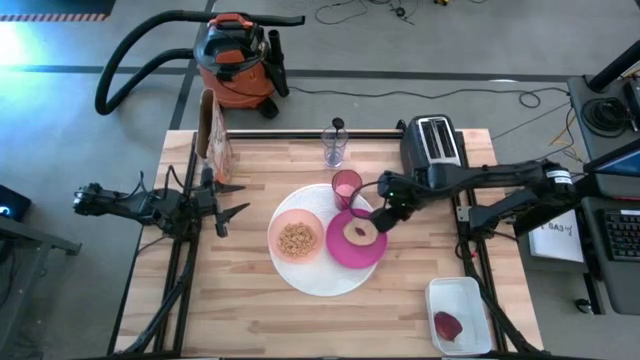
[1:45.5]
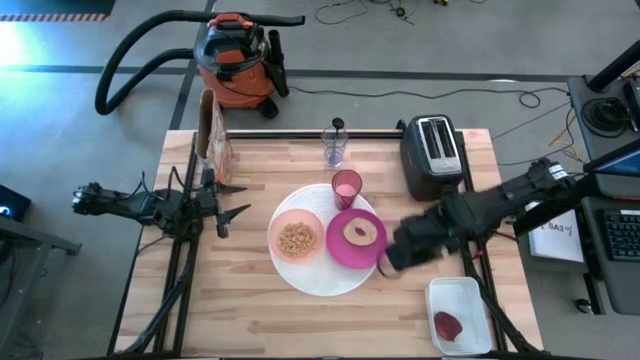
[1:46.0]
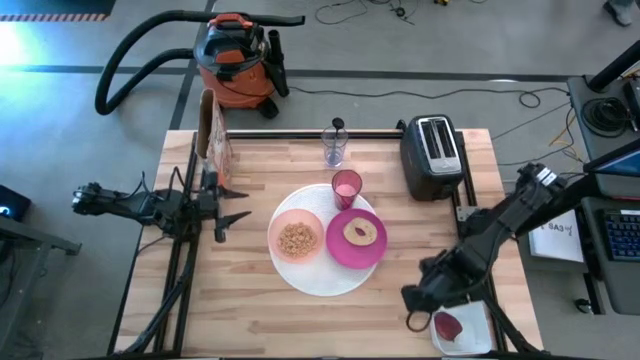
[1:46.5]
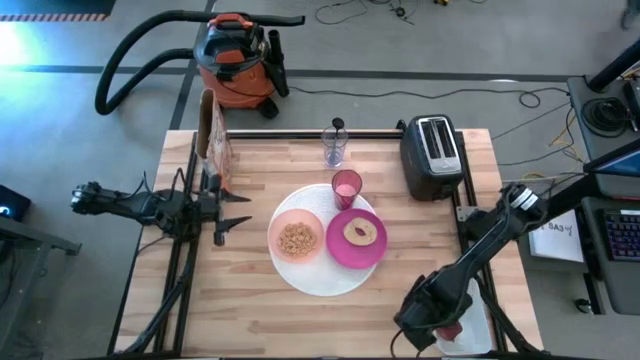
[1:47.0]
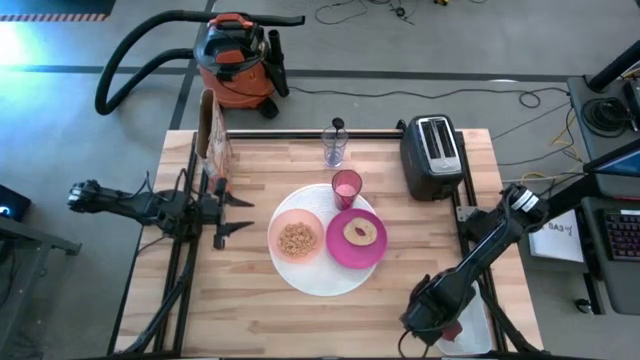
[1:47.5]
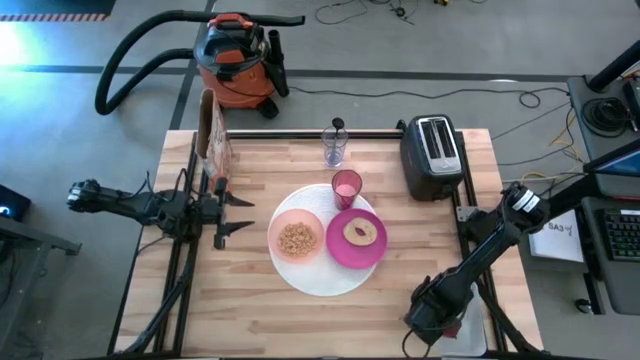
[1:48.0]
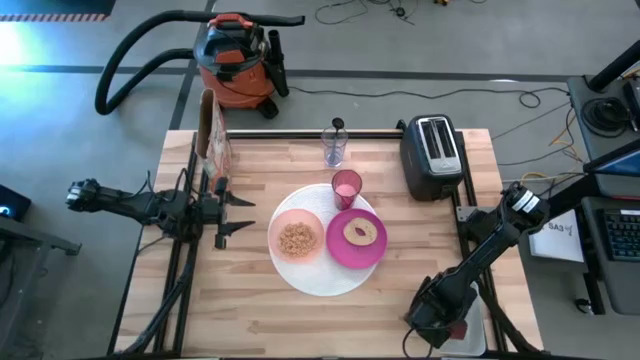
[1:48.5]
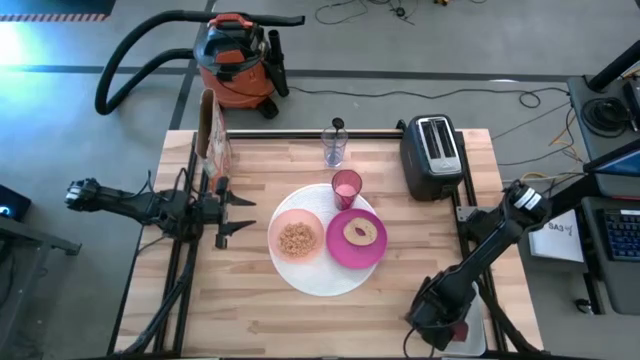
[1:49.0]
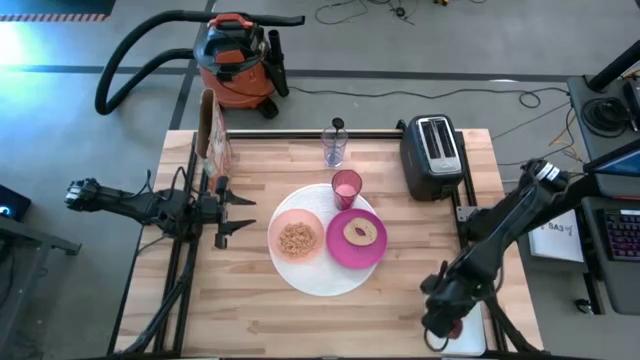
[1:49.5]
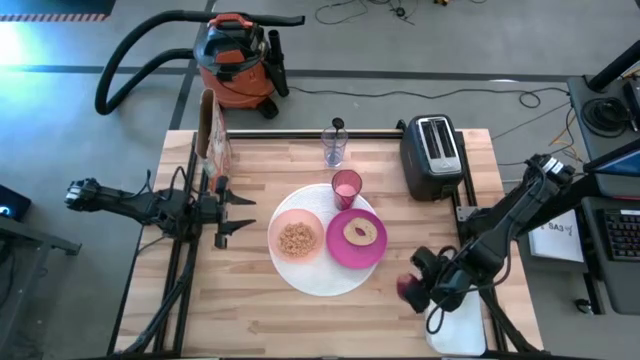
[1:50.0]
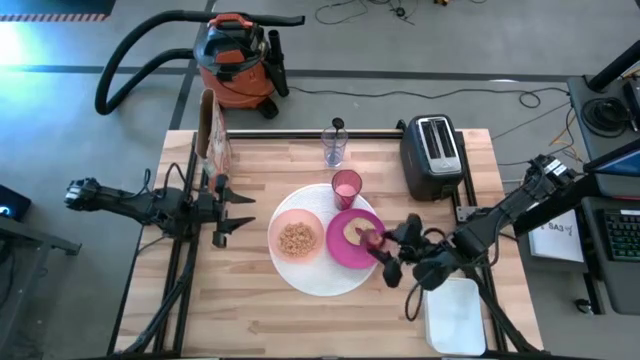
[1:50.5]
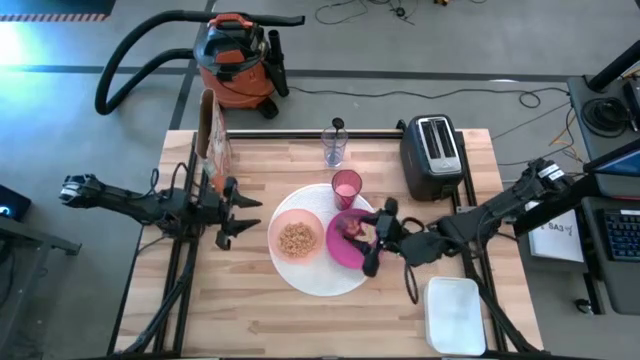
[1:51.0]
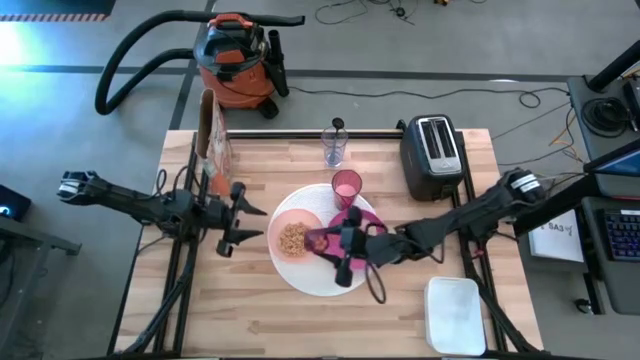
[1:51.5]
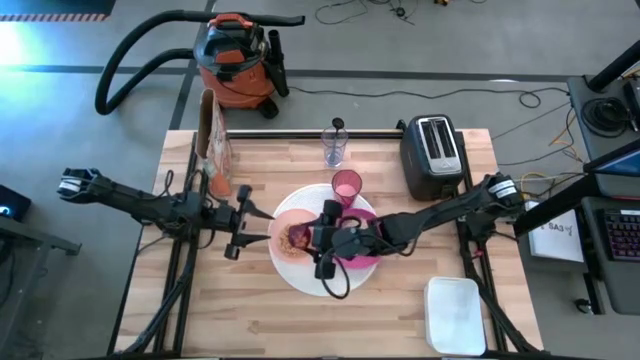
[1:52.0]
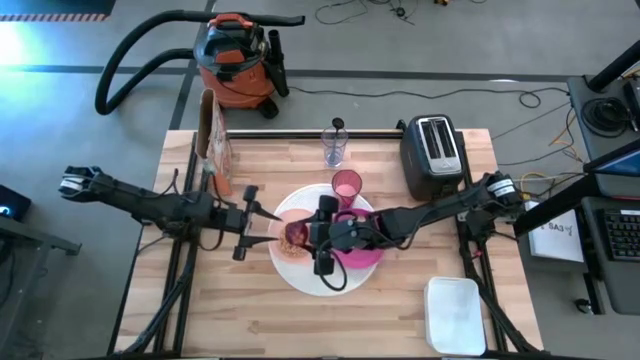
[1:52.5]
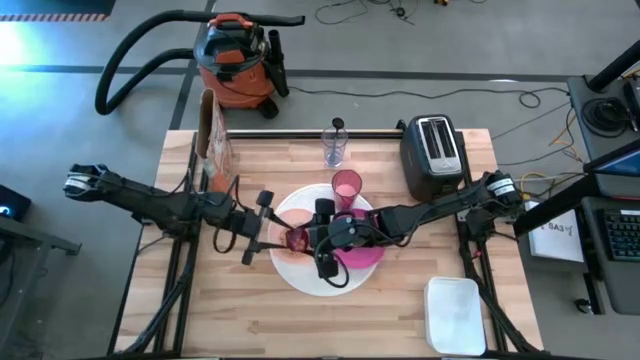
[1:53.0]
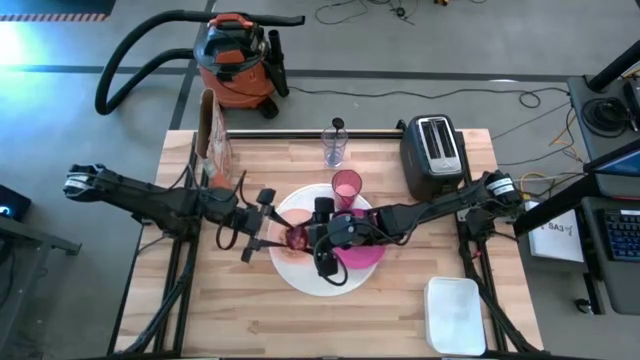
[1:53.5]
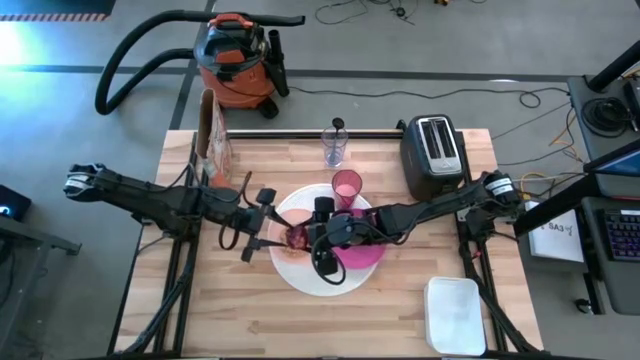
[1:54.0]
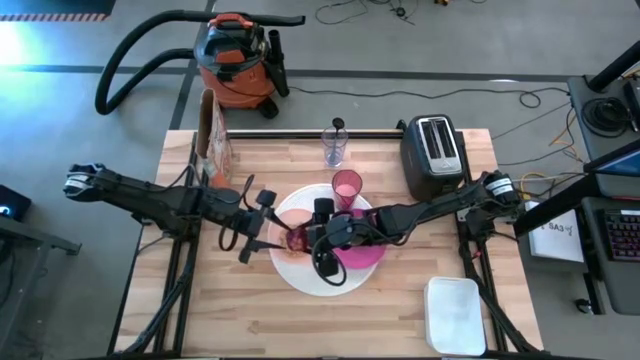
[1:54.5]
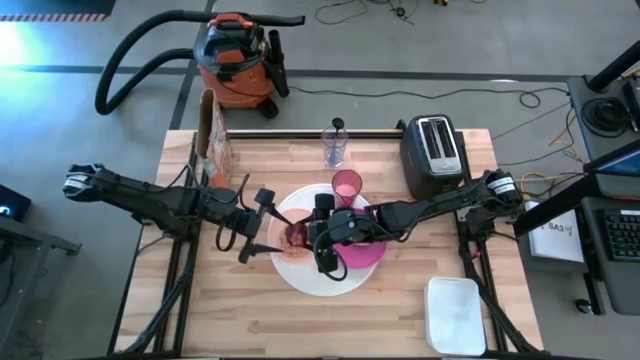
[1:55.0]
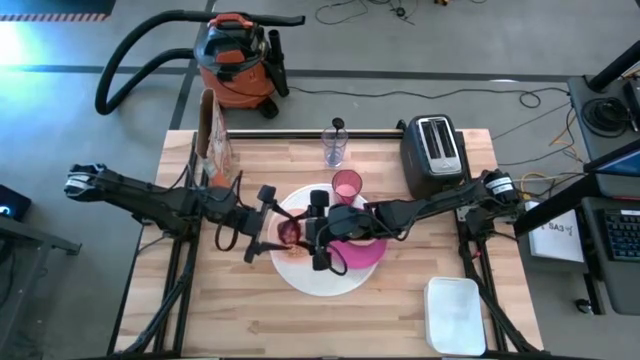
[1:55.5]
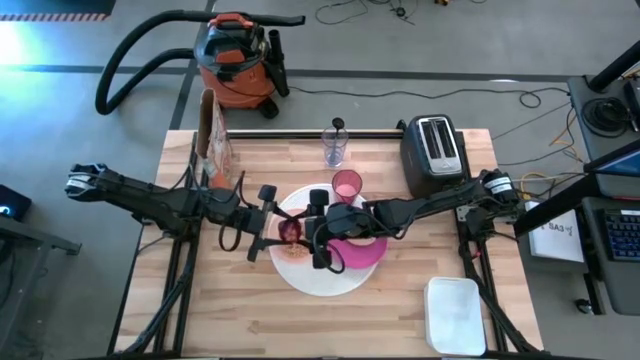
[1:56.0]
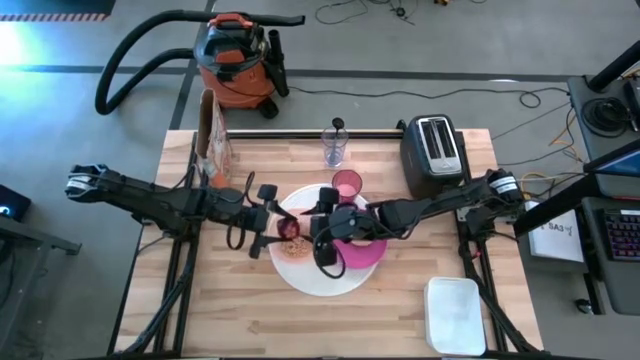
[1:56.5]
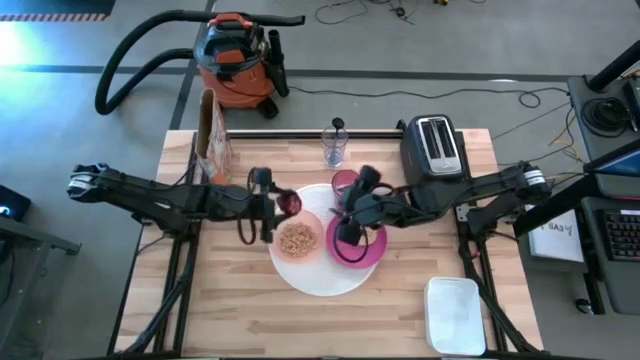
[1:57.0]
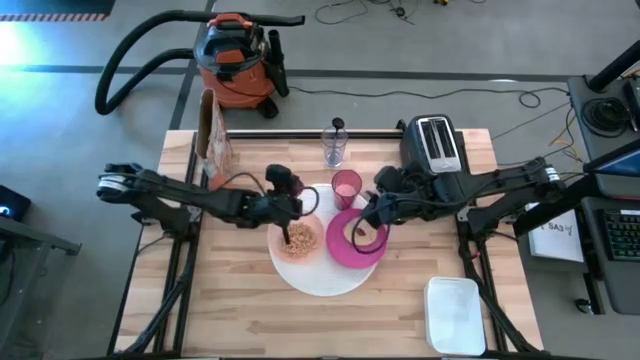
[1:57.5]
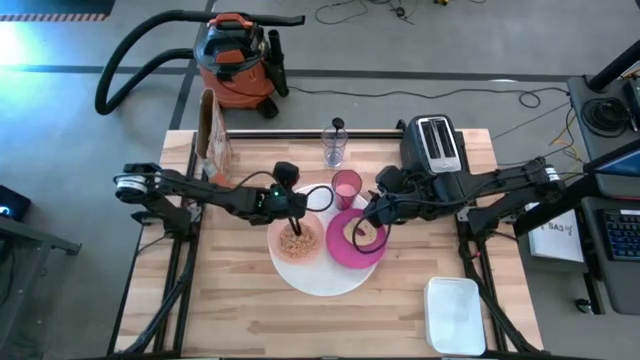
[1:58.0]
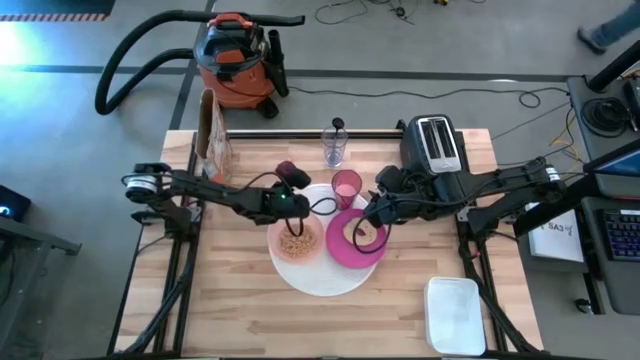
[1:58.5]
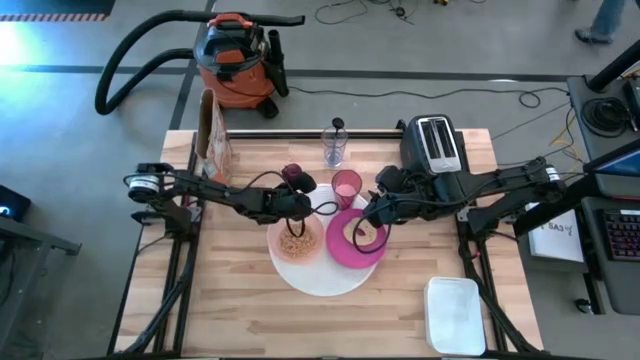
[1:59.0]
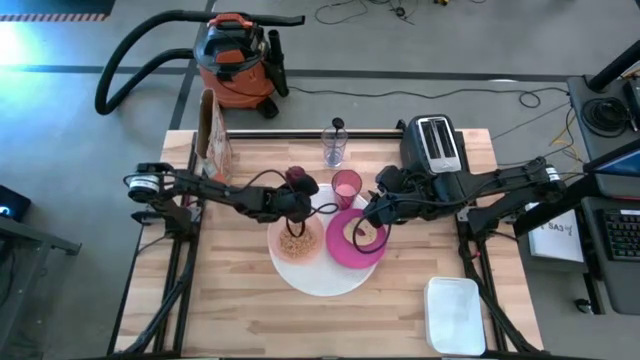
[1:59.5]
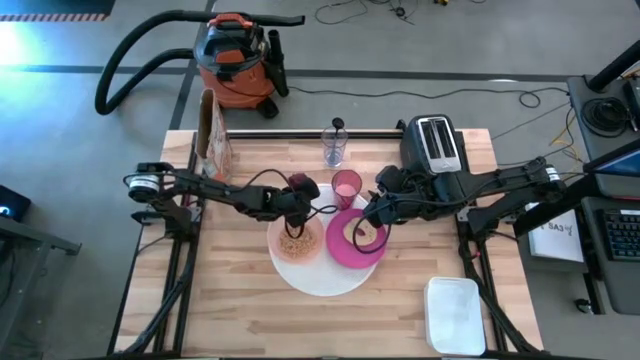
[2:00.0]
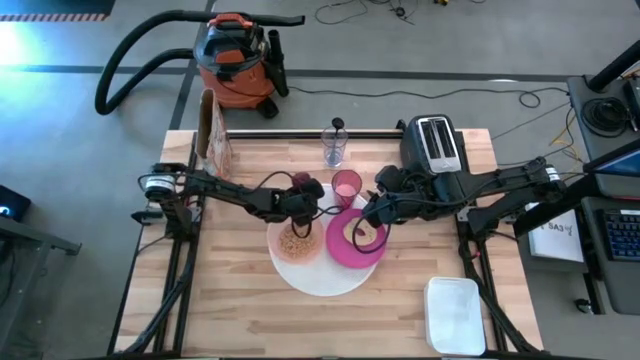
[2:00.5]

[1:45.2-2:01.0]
Task: Arrange a breakfast setting
Put the red apple on the white table mat at the top right of the orange bowl

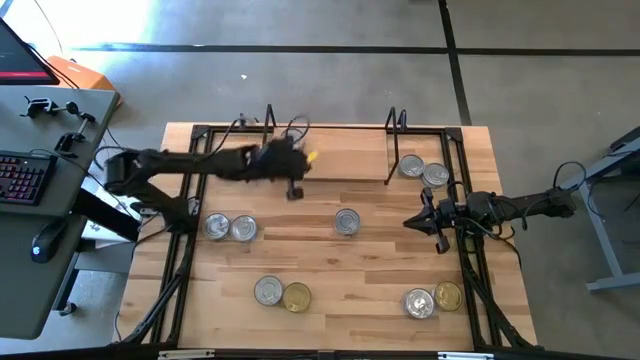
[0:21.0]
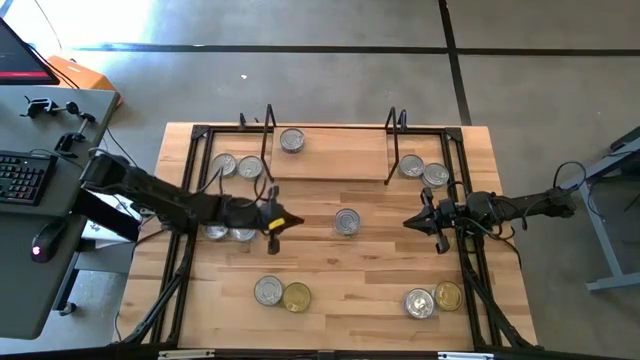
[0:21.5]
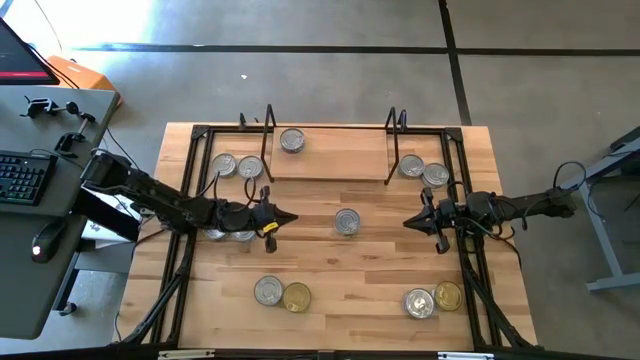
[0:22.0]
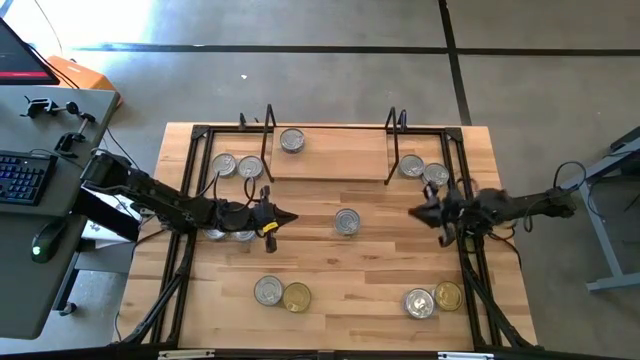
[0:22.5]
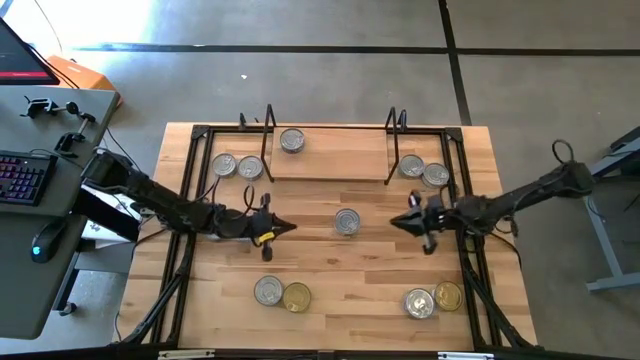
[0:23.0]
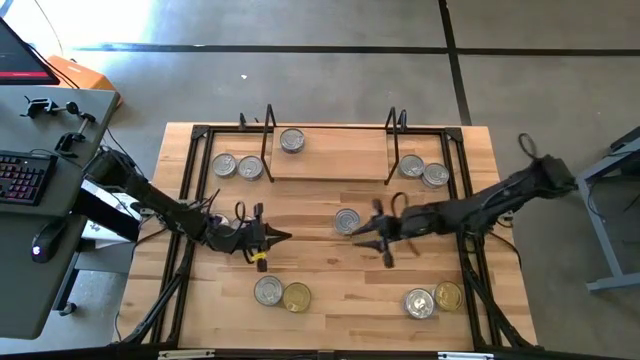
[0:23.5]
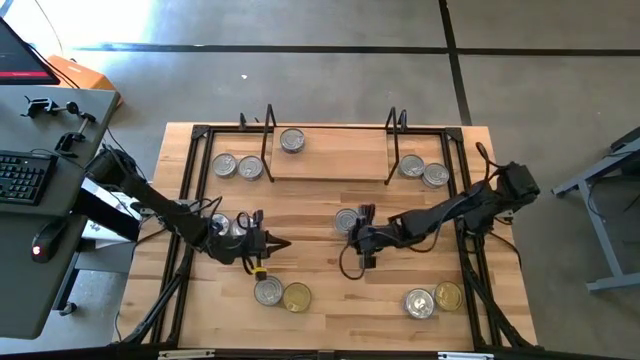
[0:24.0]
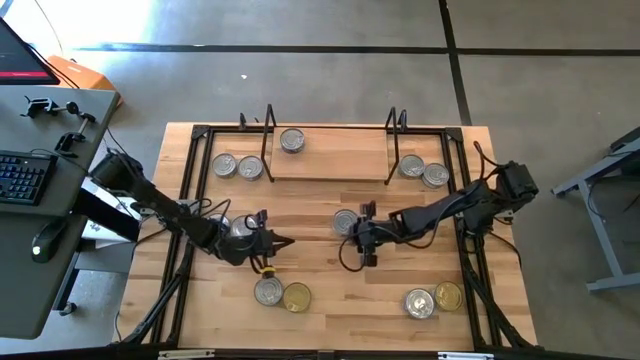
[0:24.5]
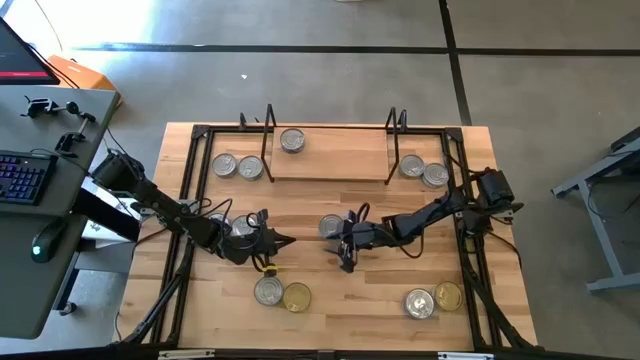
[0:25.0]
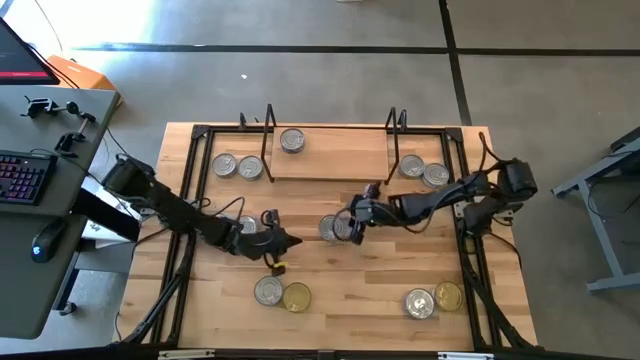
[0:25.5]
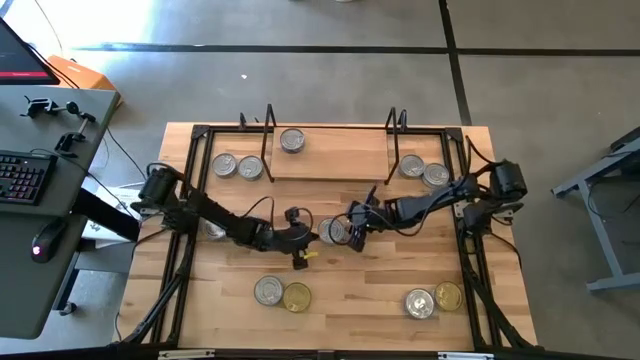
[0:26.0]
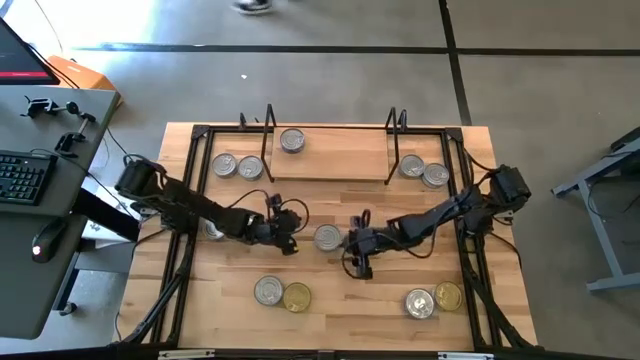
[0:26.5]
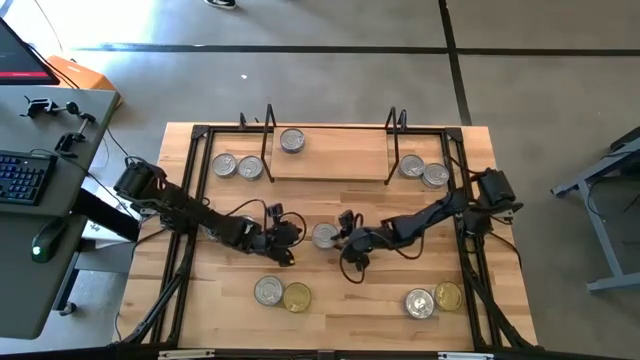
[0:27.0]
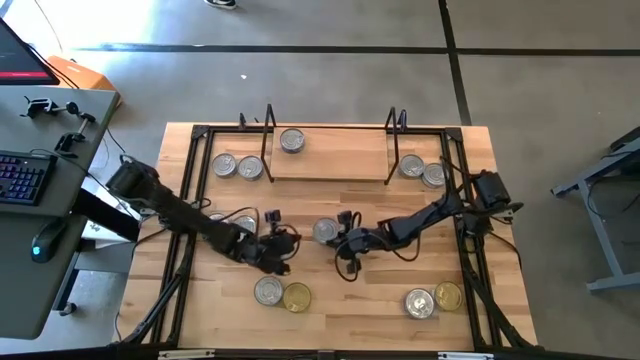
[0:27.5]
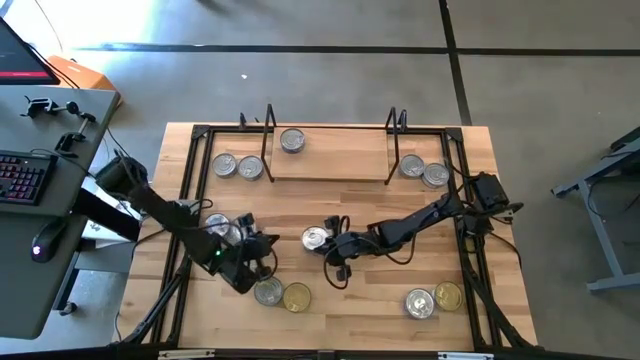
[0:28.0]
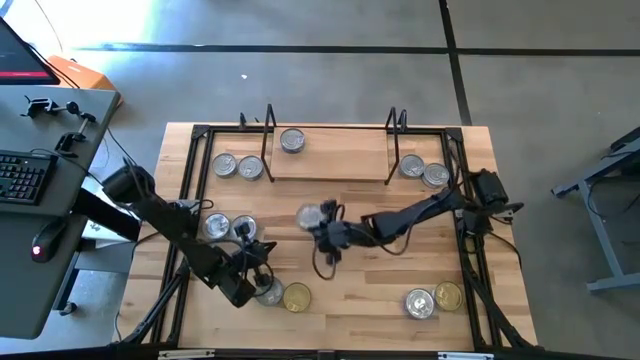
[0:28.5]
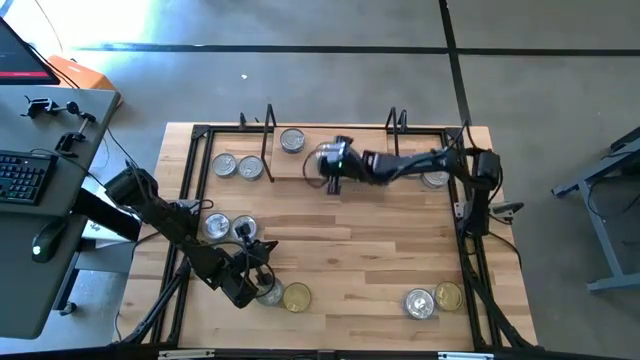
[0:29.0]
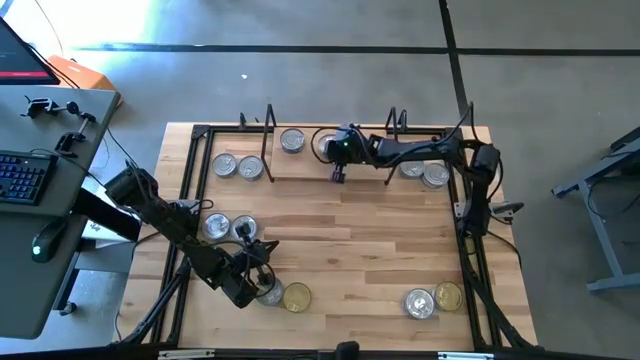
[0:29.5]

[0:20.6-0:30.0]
Task: Stack canned seafood by type on shelf
Put the green tuna can on the shelf
